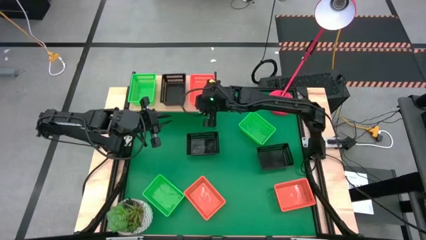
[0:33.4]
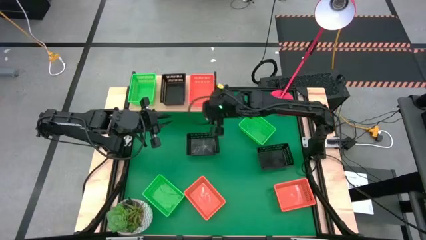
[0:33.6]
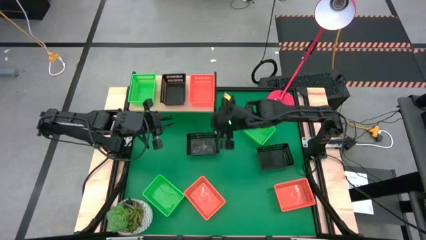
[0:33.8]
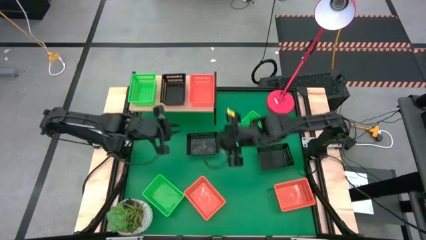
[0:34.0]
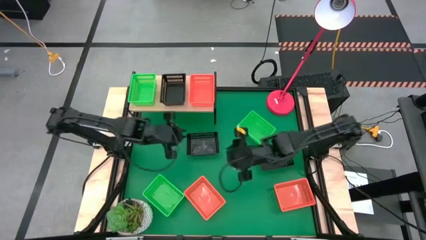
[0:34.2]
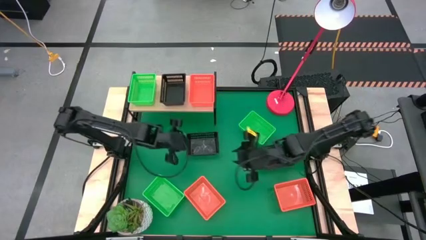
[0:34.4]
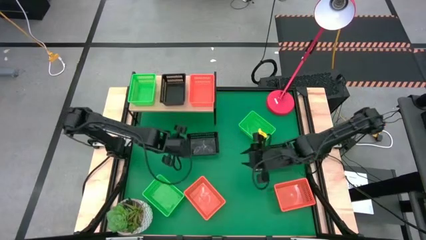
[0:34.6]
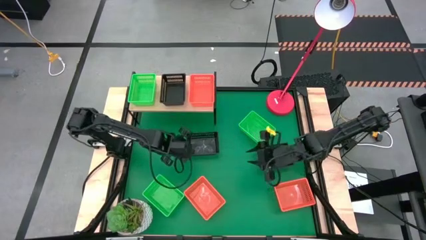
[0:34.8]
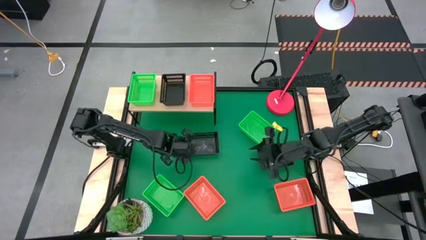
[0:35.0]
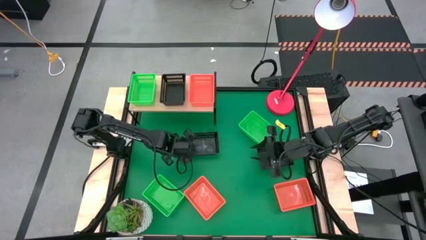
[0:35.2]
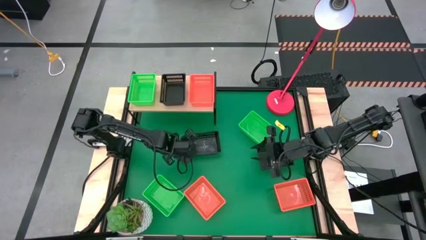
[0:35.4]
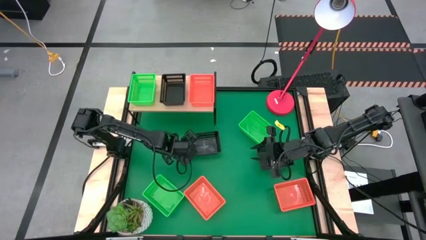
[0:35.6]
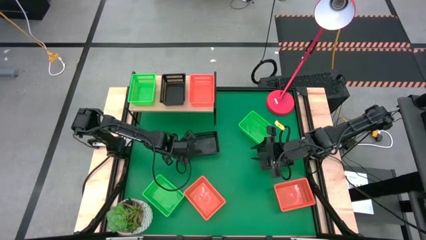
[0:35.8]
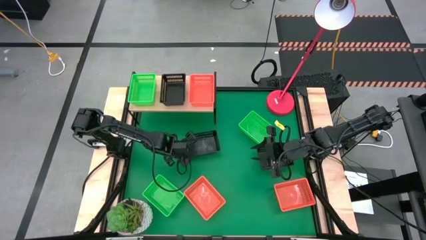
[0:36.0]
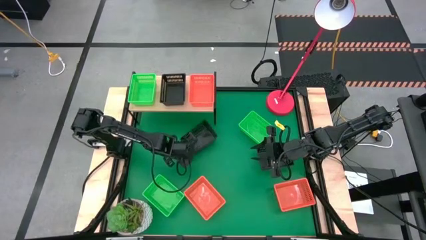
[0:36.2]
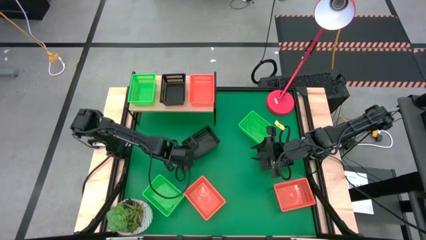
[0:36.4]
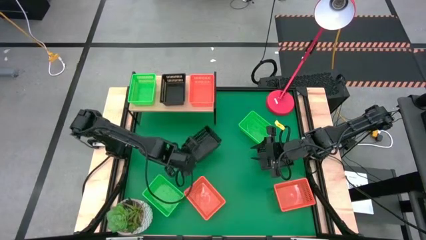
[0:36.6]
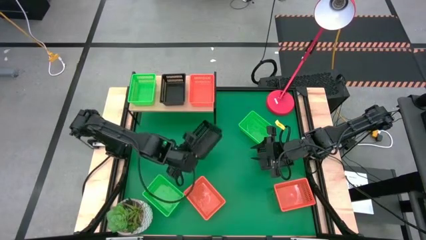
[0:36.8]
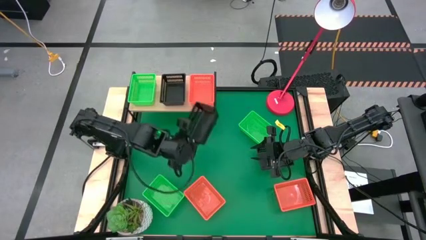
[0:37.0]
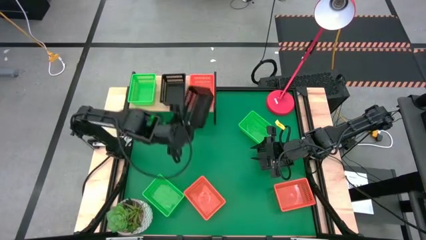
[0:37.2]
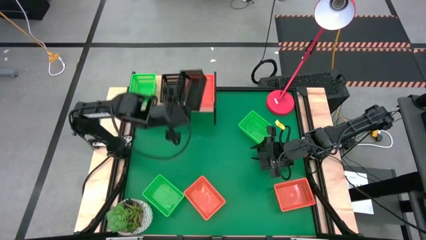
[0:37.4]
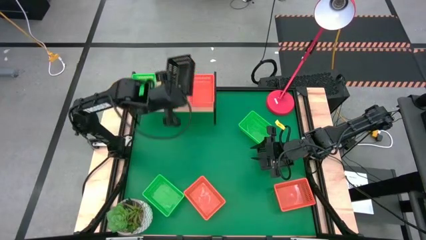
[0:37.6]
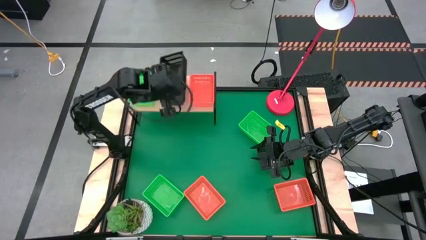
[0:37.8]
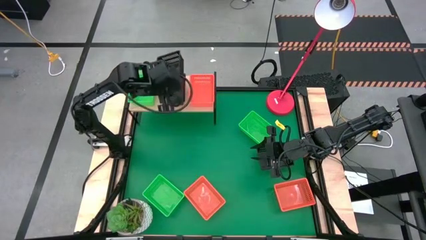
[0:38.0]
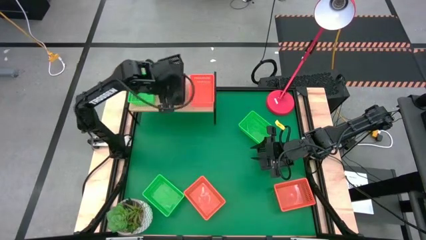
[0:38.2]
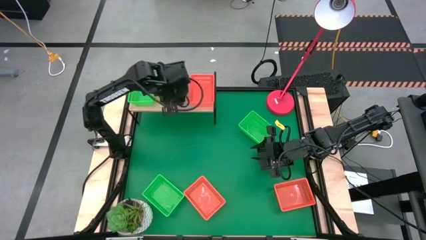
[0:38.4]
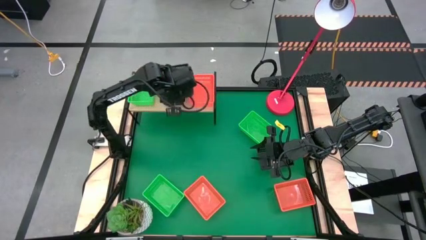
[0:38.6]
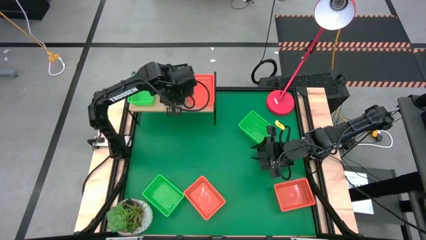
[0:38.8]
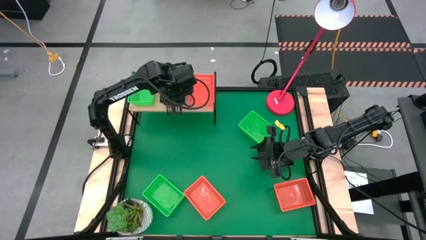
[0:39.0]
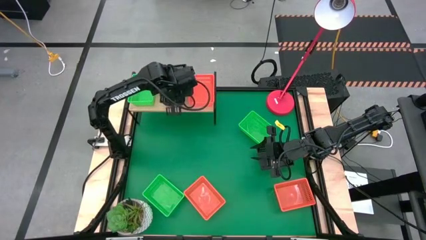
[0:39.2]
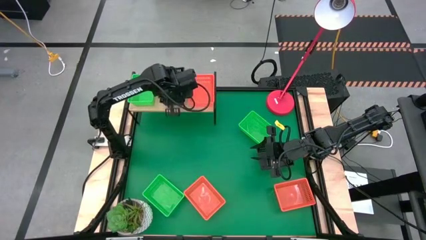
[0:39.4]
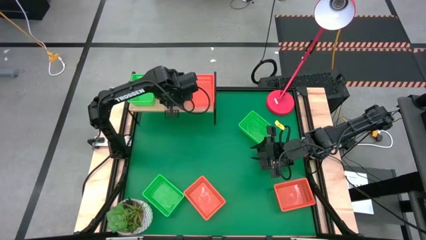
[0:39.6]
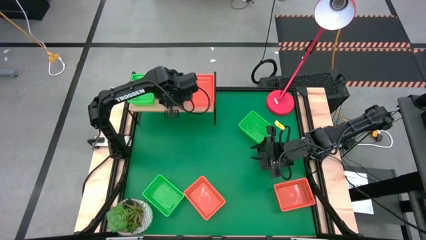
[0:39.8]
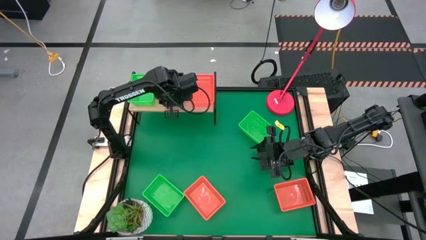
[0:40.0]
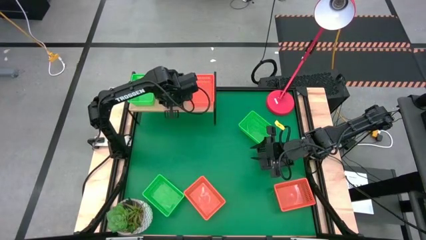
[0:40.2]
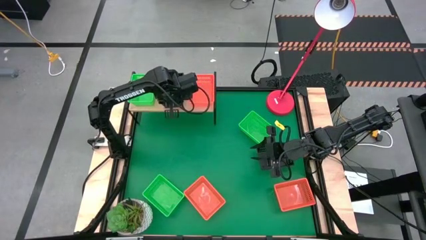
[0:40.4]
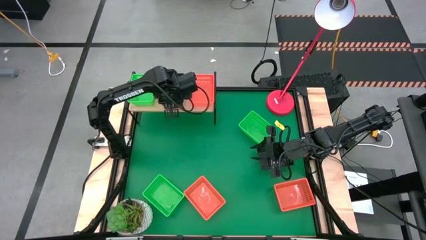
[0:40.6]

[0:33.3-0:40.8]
Task: Stack baskets on shelf by color
Stack the left black basket on top of the other black basket on the shelf

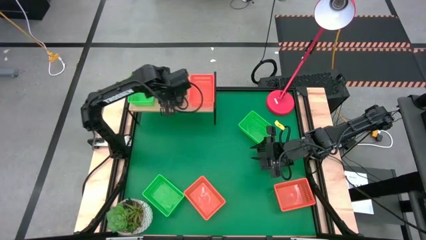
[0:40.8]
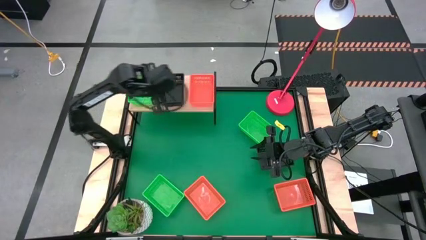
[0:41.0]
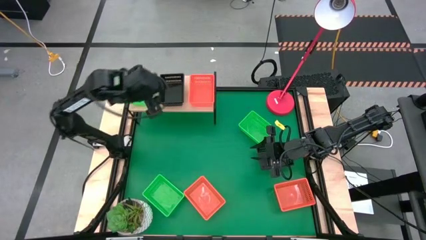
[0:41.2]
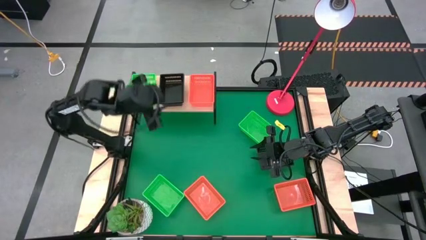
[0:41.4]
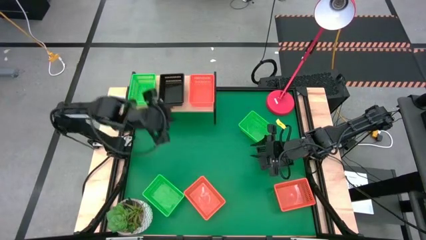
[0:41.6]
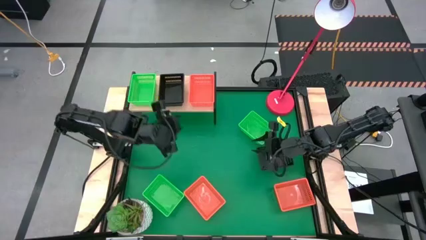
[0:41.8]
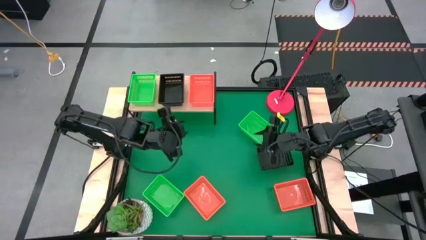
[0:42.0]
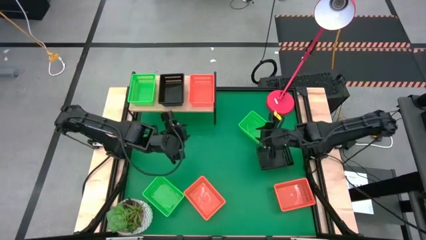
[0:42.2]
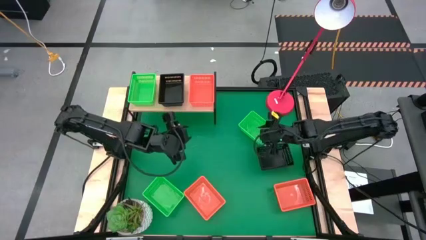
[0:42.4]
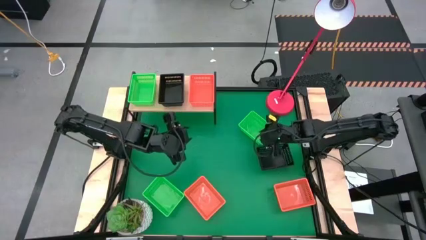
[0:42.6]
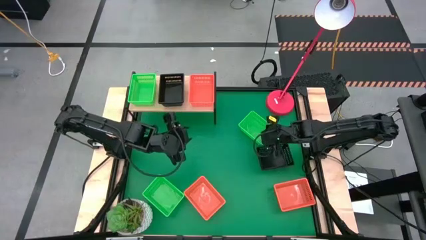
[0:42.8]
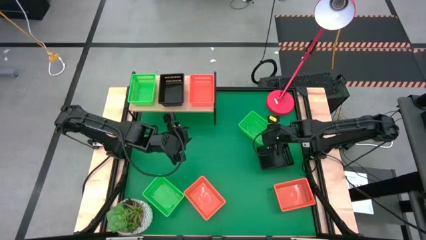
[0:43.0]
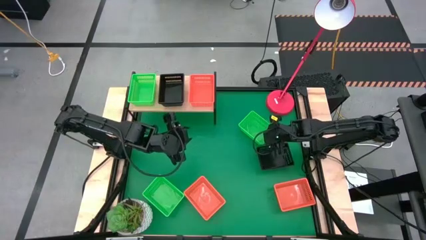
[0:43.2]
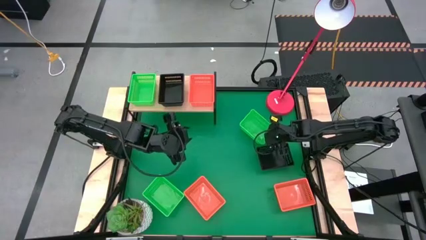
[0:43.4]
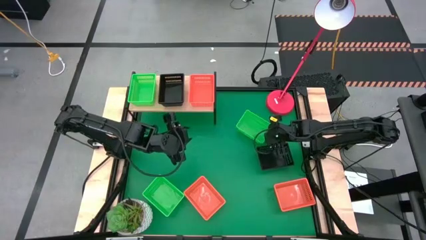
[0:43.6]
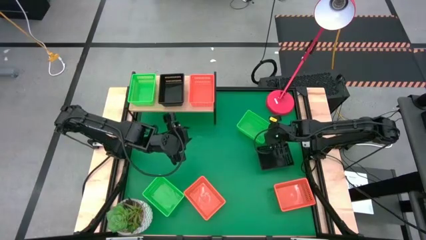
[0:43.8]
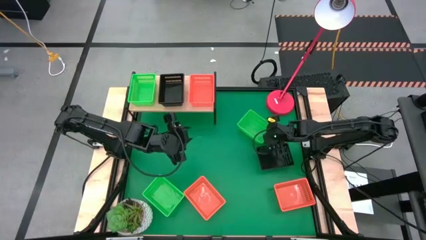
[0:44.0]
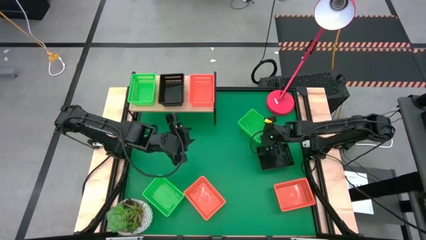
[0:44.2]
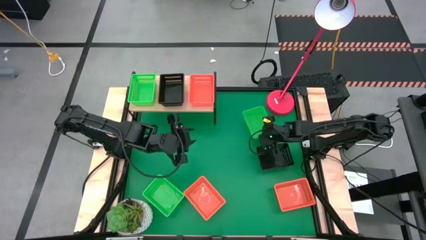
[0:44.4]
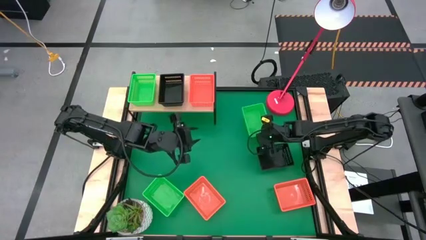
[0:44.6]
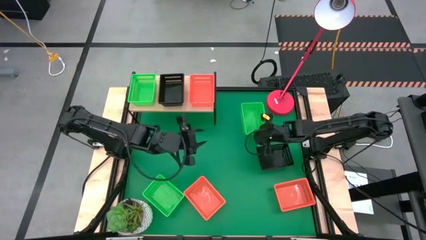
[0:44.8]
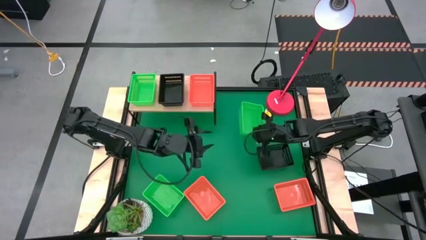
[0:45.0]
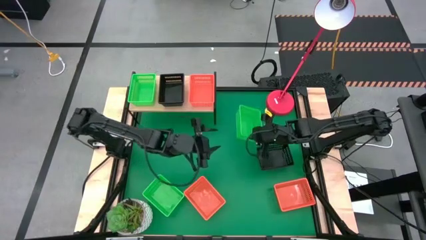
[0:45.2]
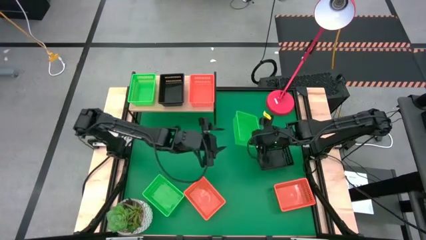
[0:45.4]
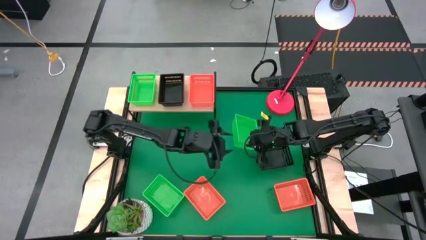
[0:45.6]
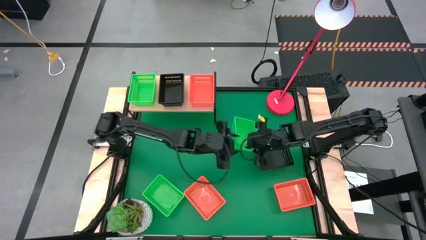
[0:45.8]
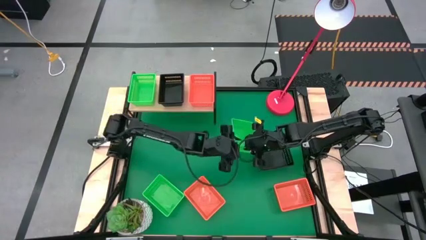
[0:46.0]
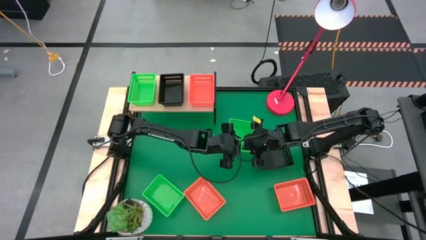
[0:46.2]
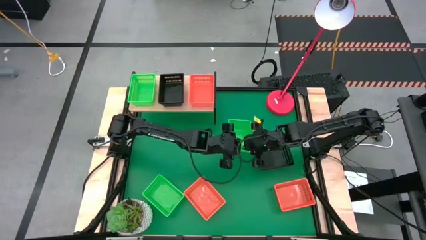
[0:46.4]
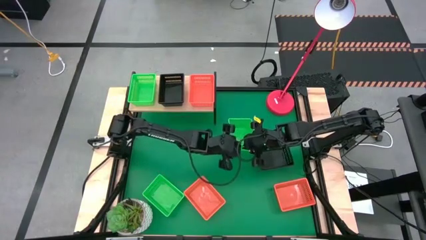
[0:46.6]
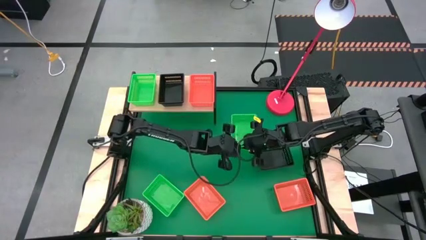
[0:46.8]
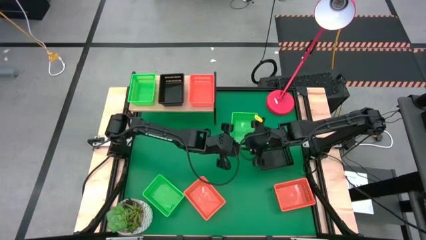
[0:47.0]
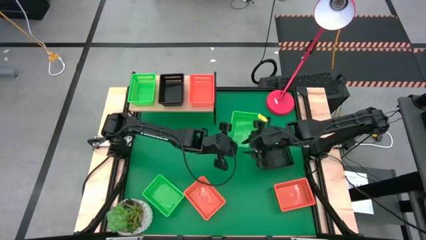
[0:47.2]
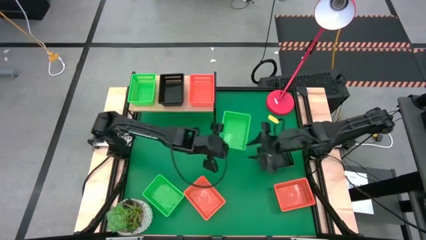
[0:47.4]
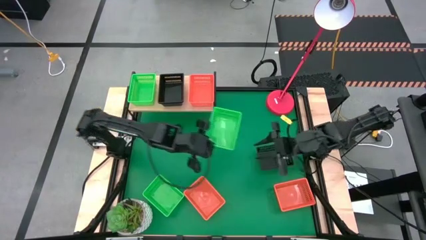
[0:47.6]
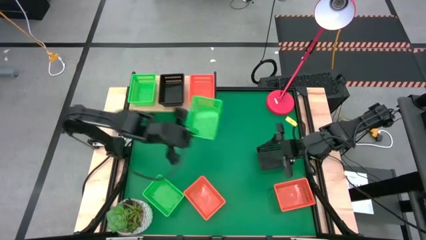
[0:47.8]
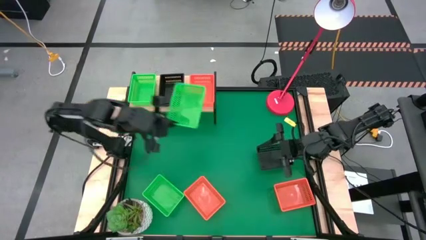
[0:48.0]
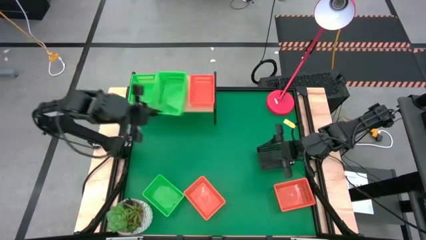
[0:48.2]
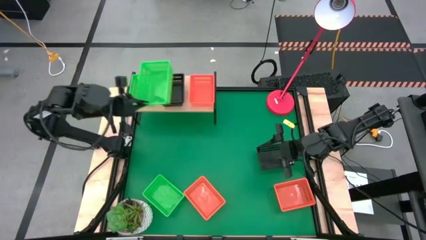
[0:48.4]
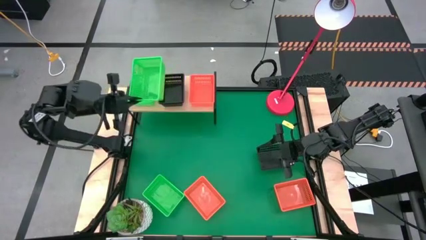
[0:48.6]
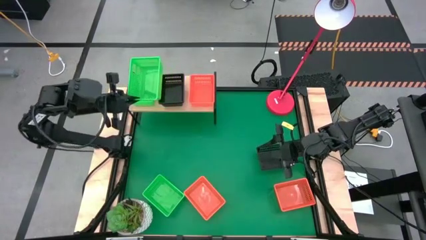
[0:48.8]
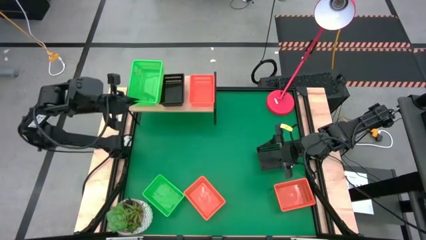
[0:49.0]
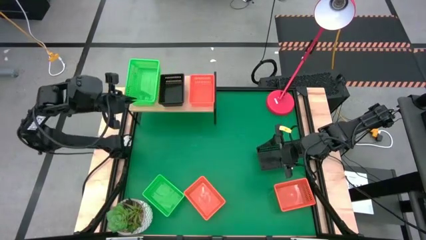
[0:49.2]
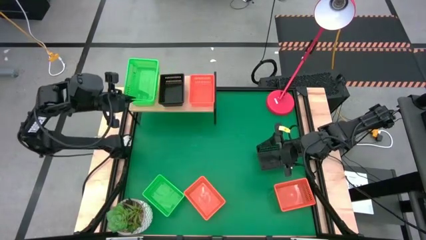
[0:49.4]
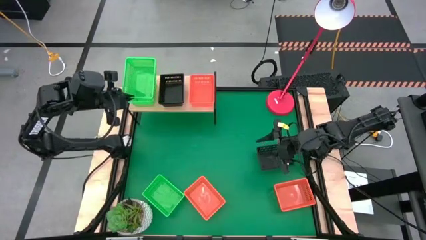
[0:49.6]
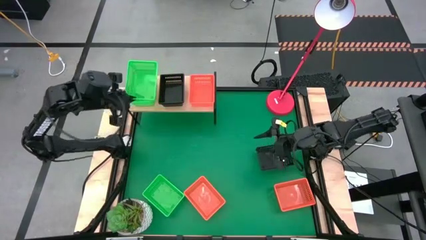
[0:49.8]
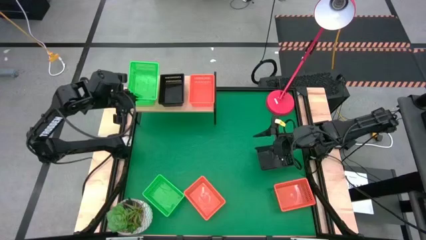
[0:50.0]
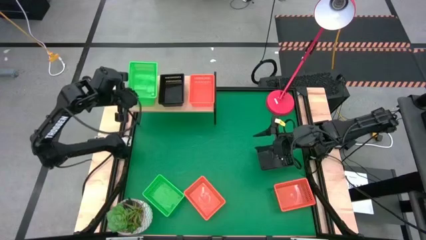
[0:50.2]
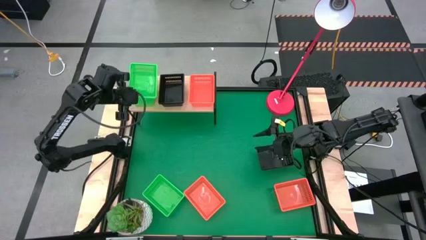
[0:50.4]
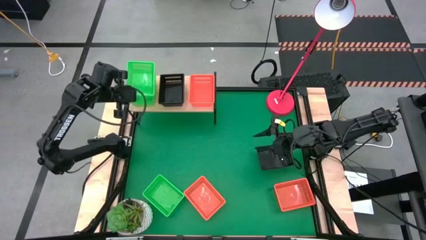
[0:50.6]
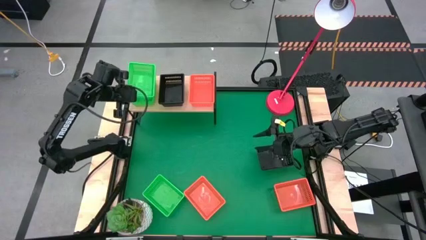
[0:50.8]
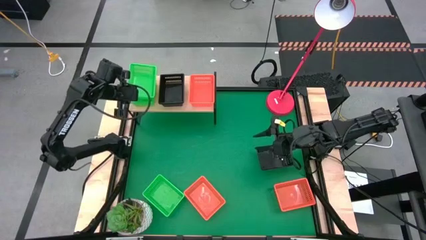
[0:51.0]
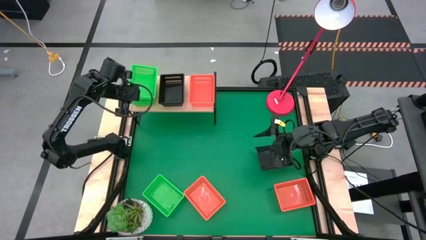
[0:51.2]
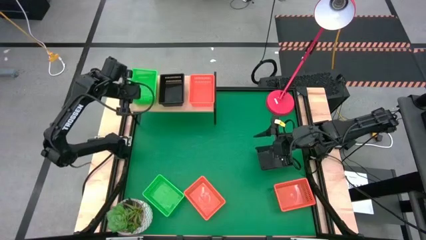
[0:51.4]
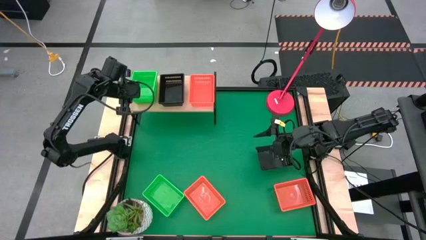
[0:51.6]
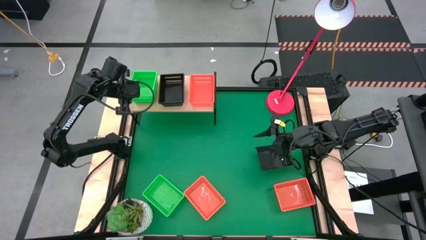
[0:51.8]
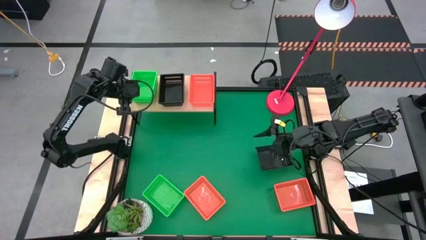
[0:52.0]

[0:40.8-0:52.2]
Stack the top green basket on top of the other green basket on the shelf
